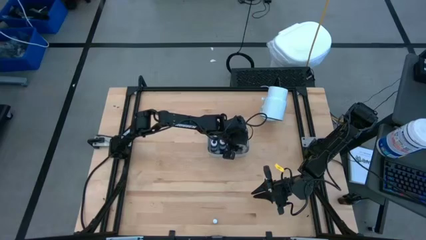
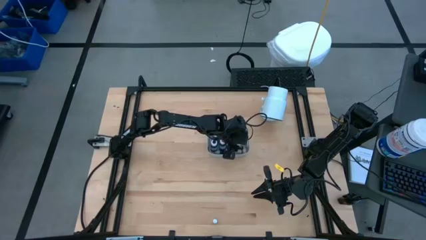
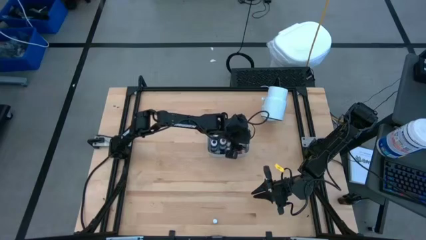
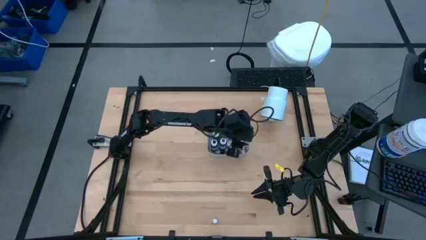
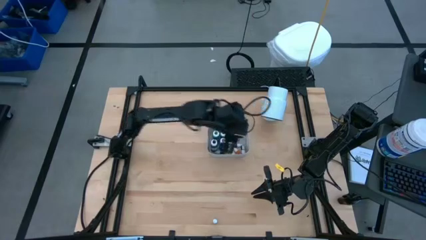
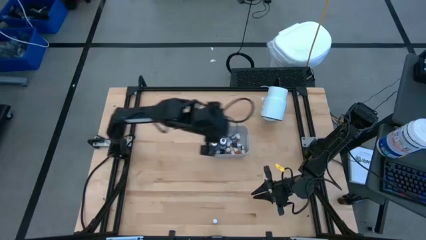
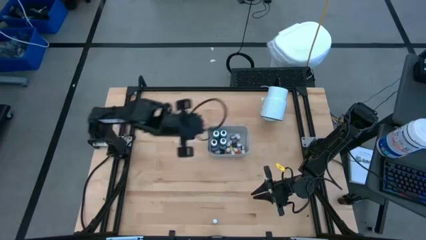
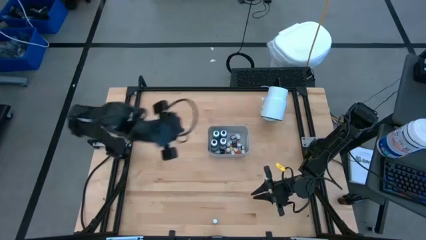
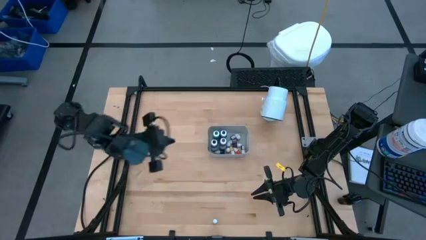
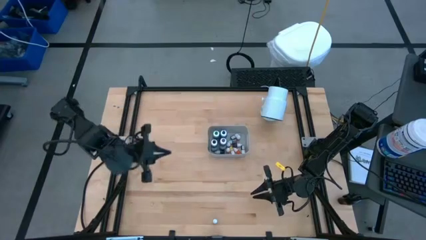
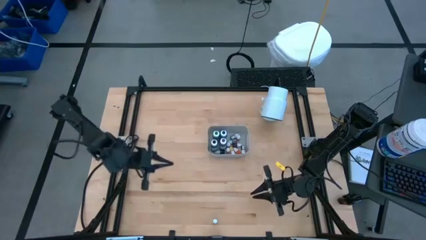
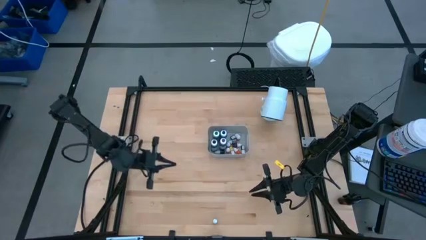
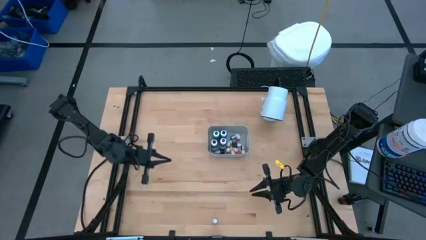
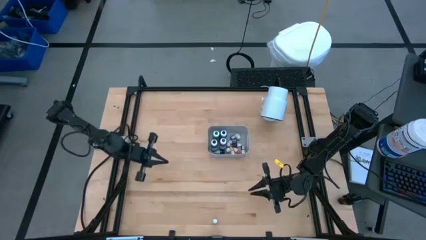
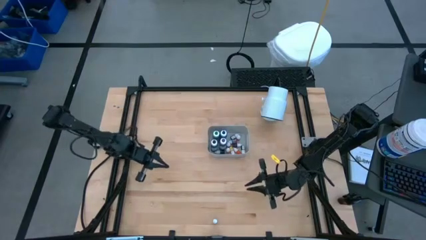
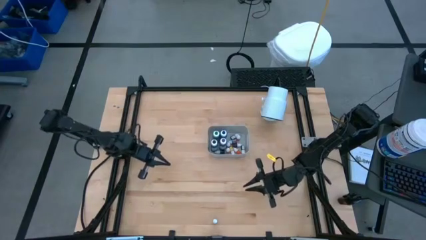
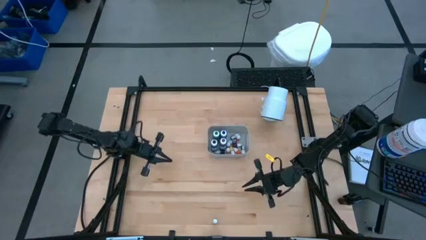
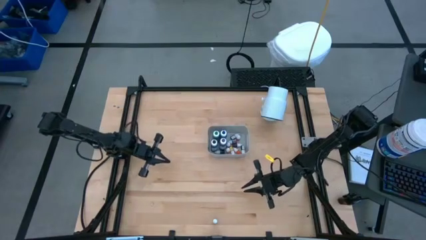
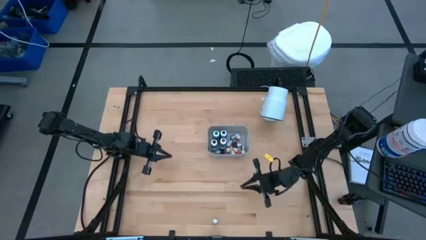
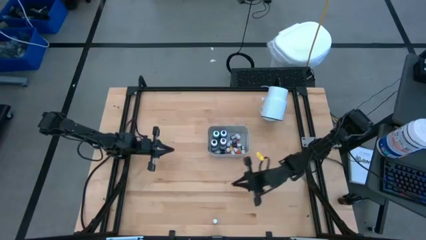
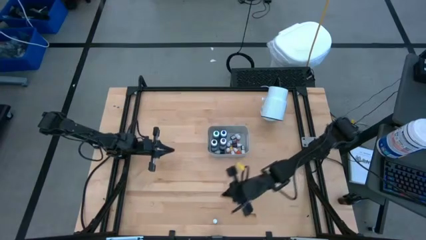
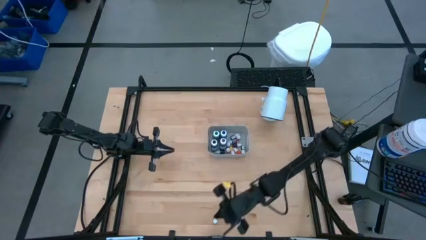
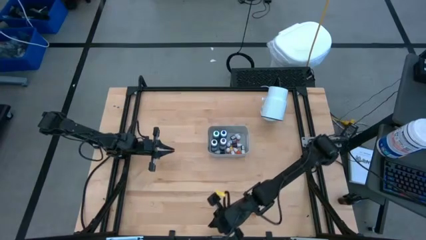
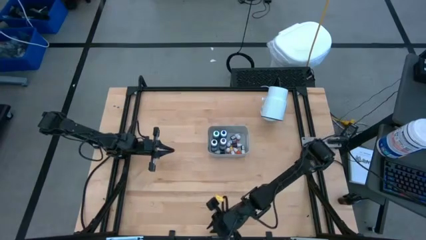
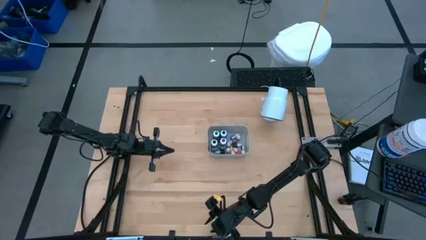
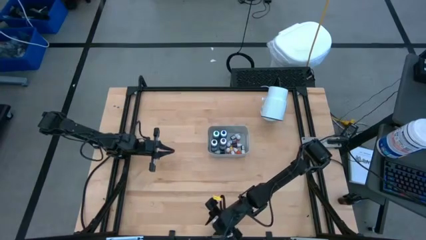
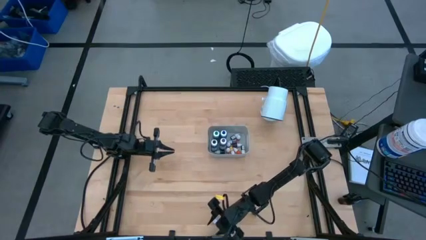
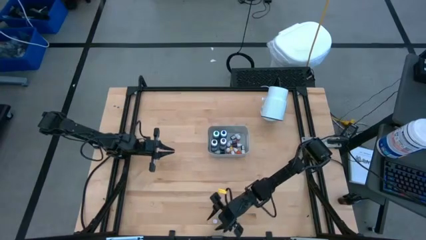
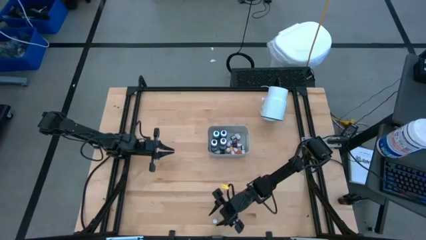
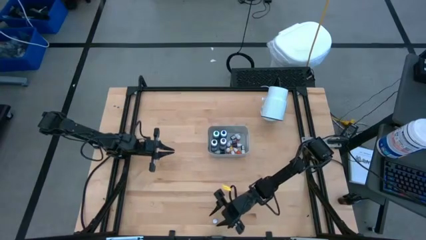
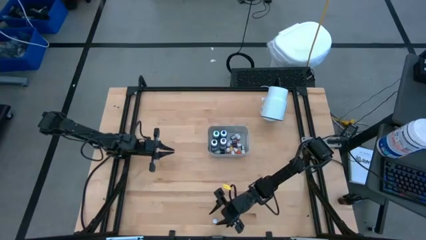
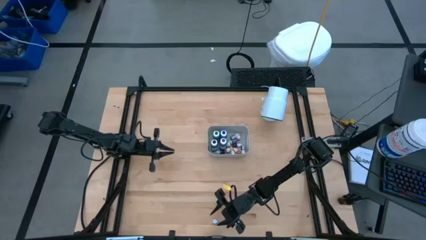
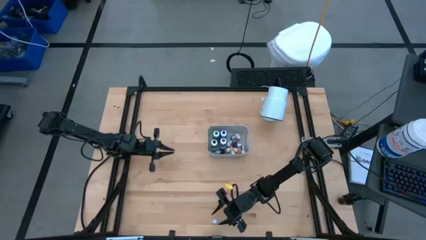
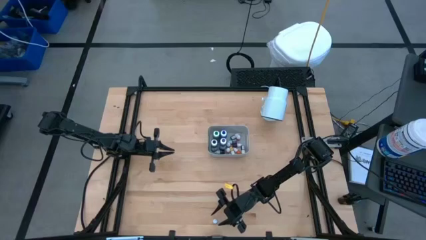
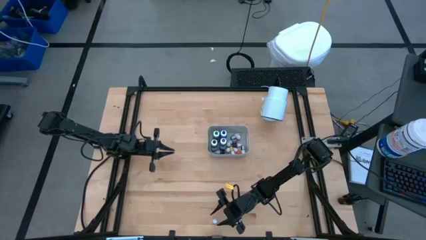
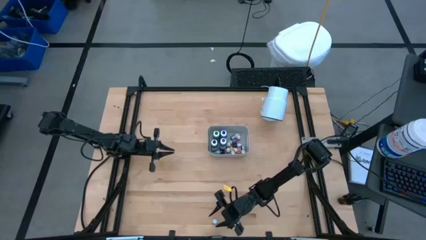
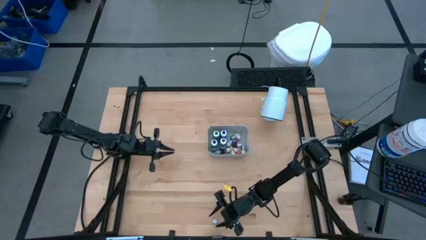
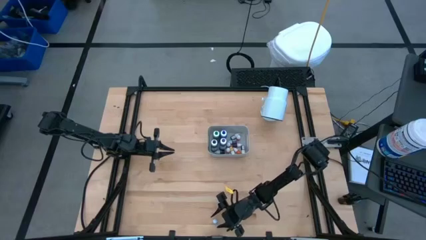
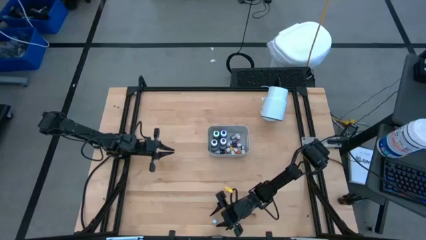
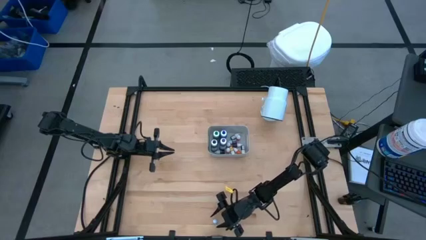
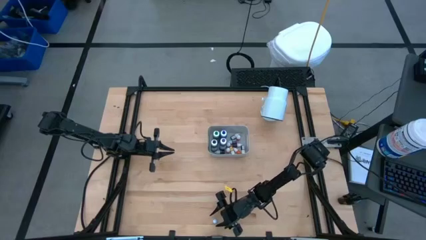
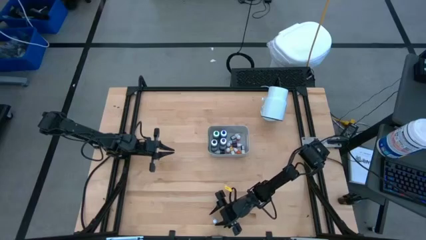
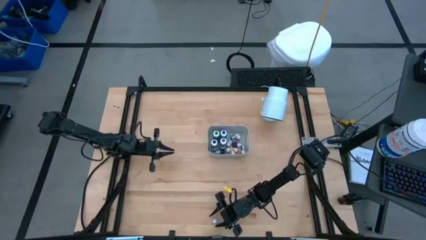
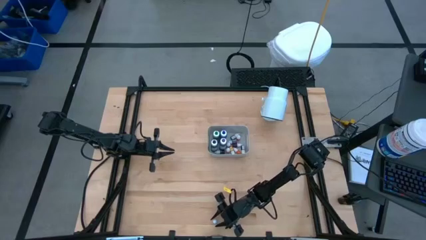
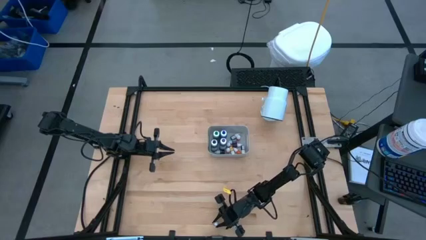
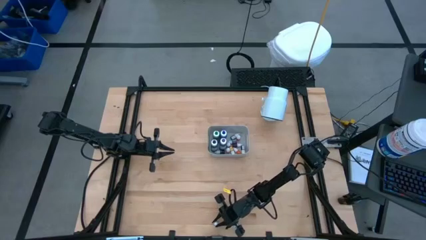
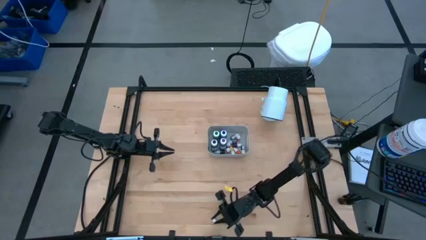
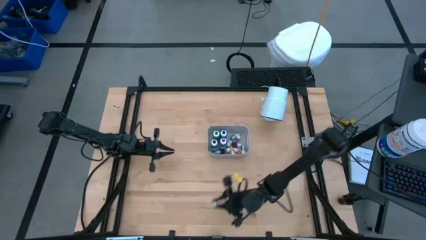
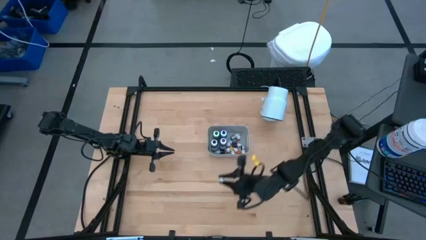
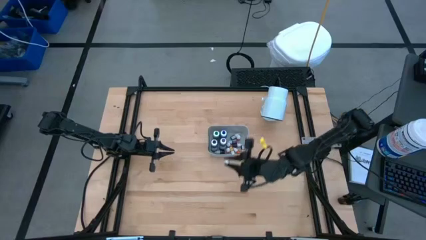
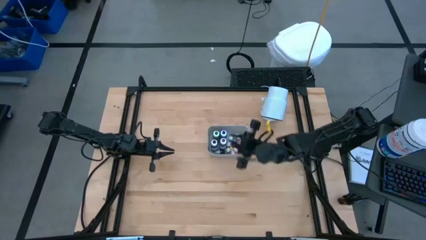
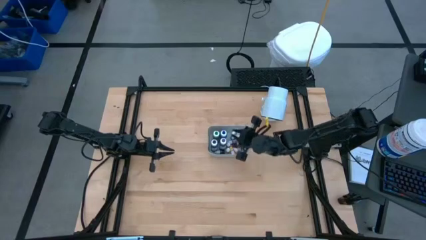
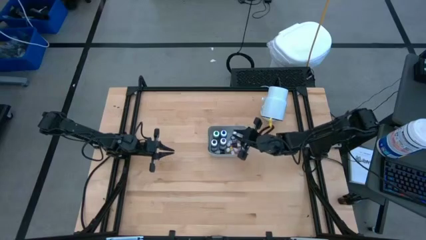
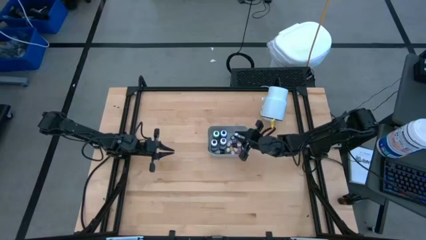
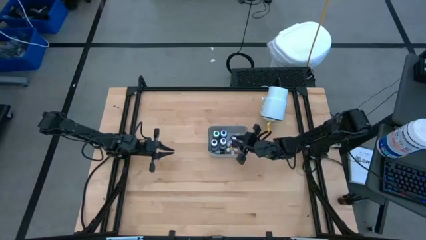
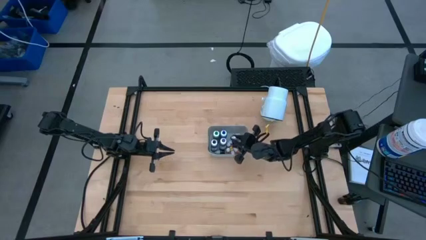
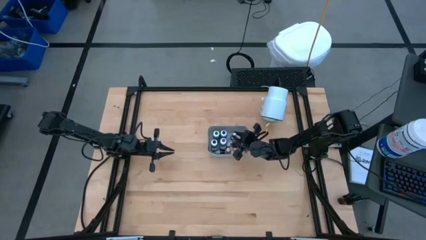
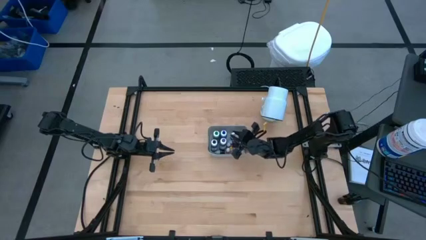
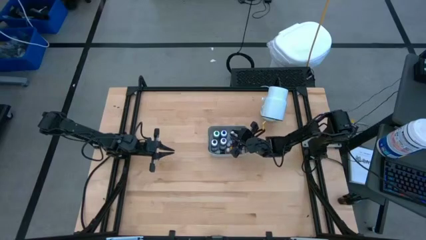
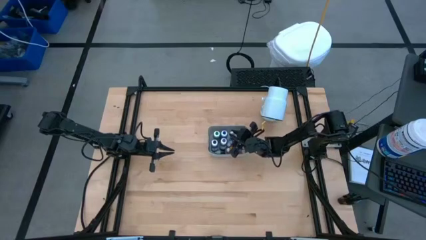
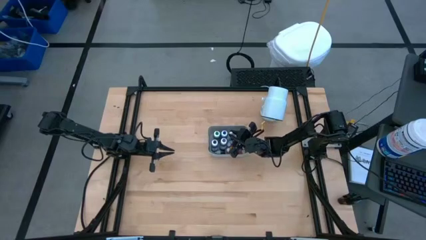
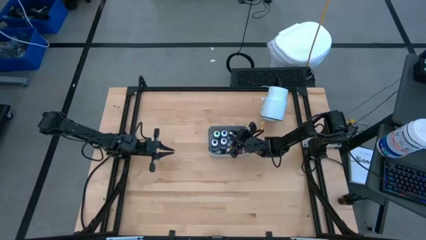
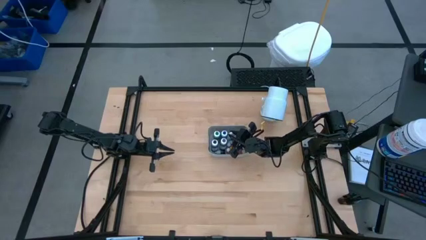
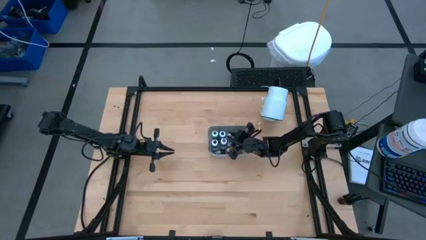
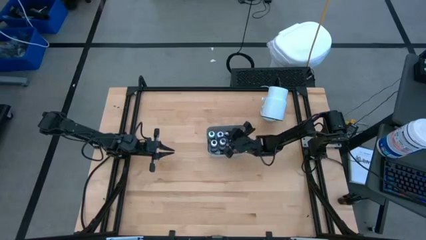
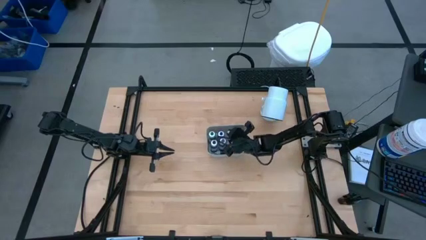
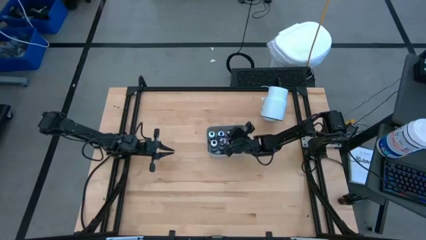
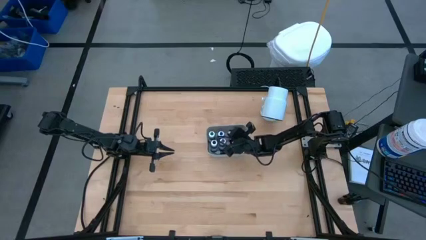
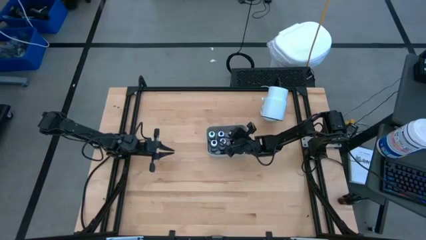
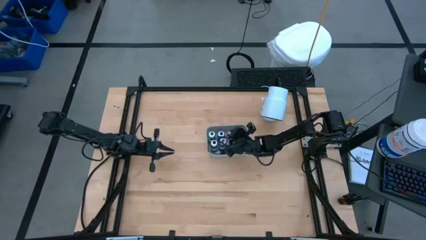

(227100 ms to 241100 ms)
Task: Pick & Place food coloring
Put the small blue food coloring bottle into the gray bin

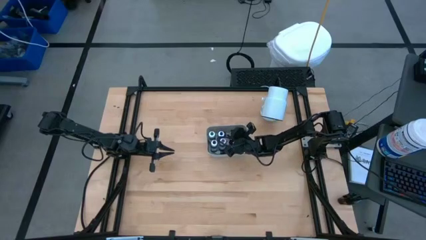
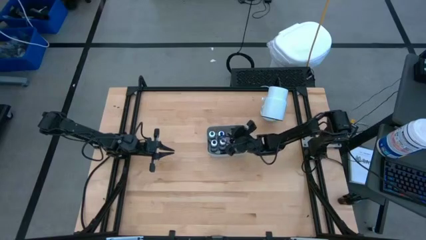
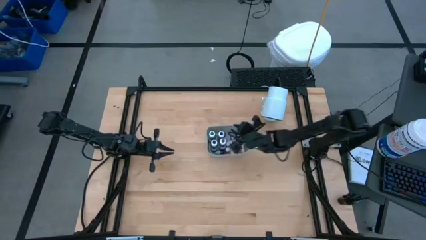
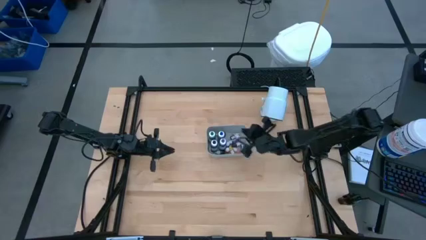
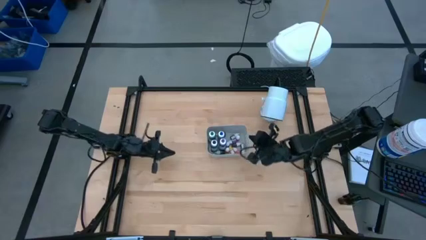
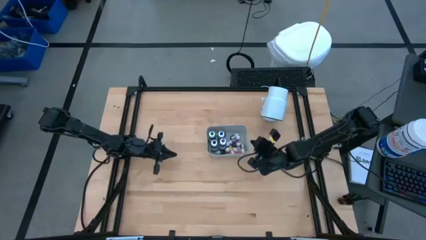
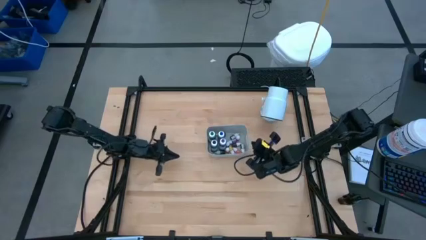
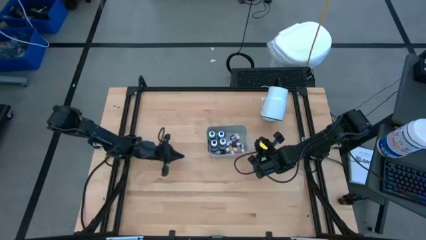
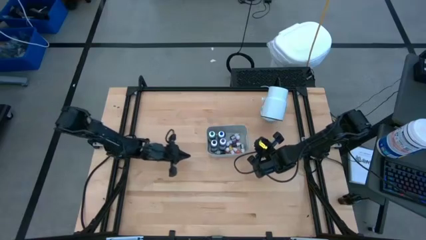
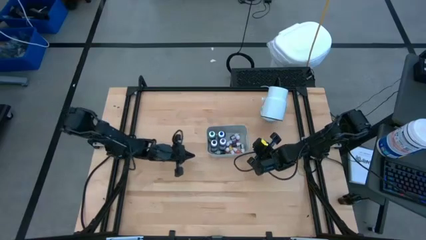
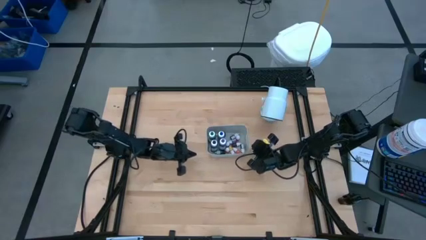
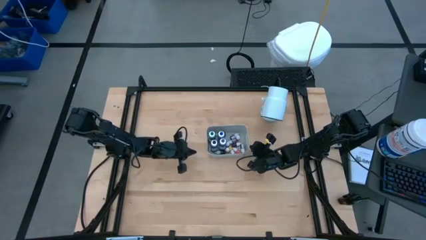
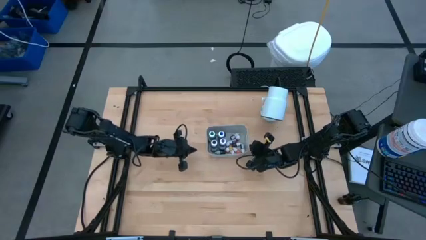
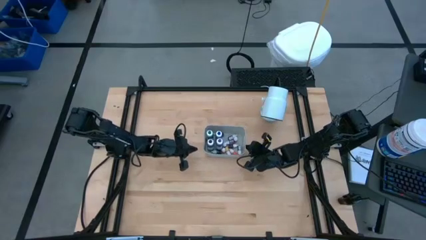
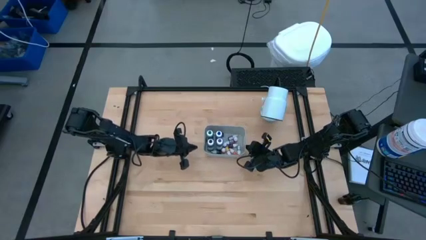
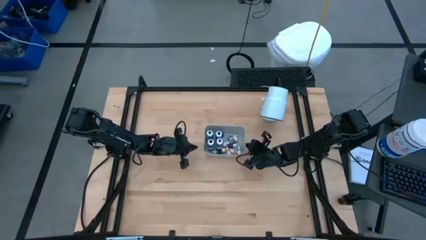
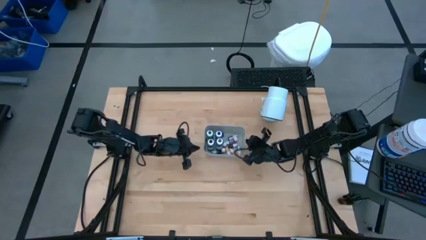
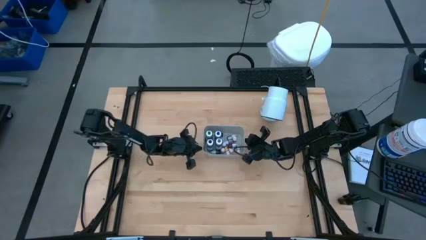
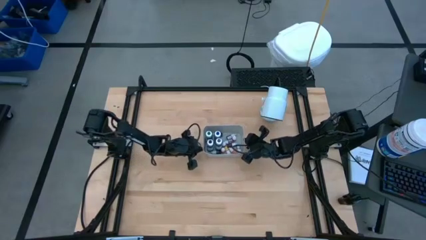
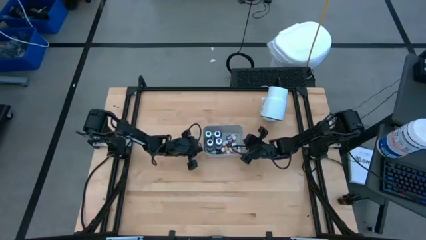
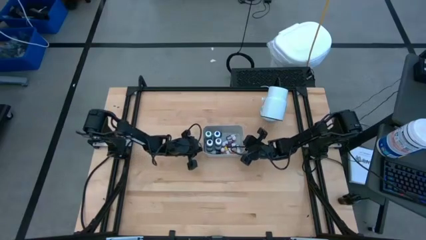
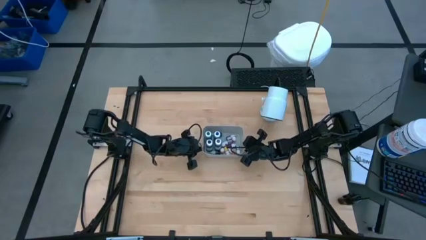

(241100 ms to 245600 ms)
Adjust the gray bin
